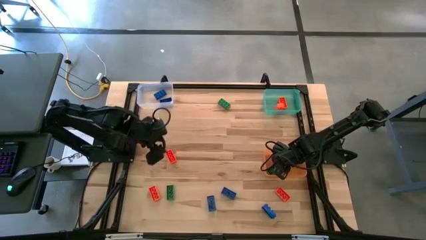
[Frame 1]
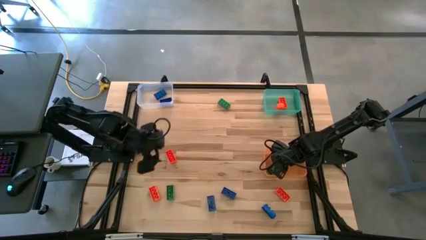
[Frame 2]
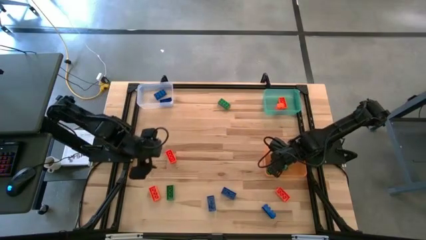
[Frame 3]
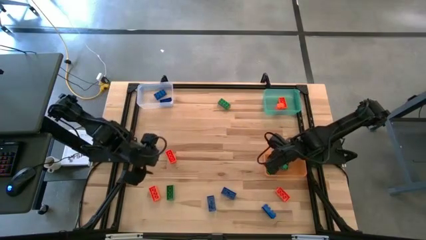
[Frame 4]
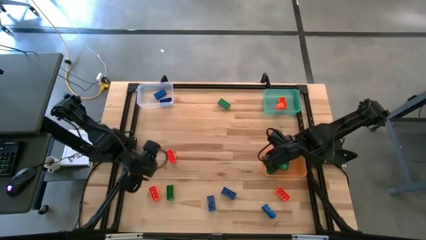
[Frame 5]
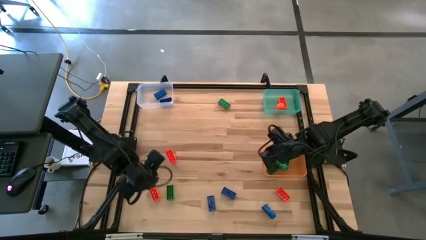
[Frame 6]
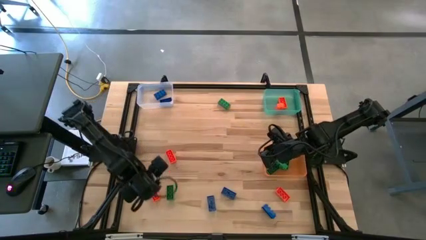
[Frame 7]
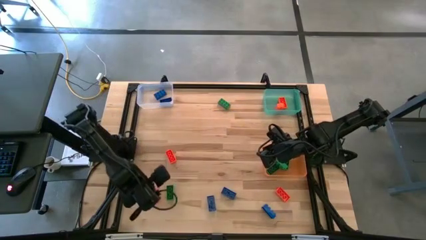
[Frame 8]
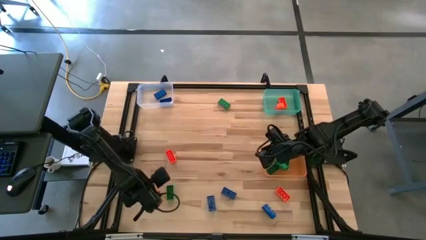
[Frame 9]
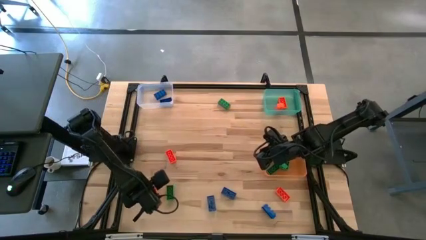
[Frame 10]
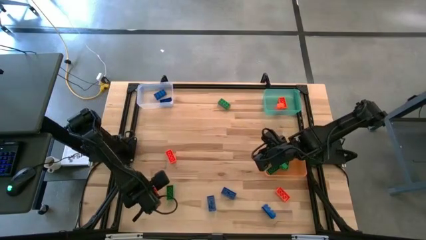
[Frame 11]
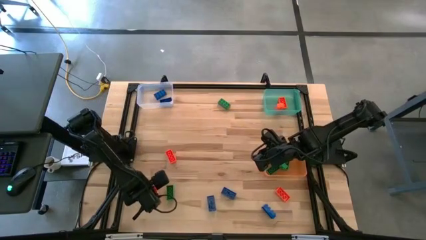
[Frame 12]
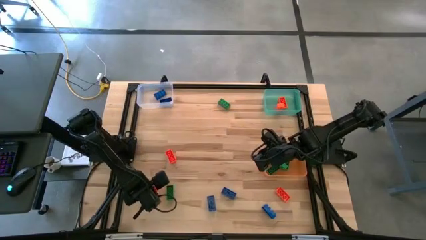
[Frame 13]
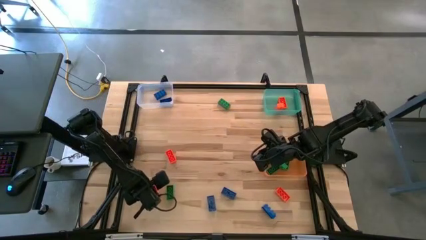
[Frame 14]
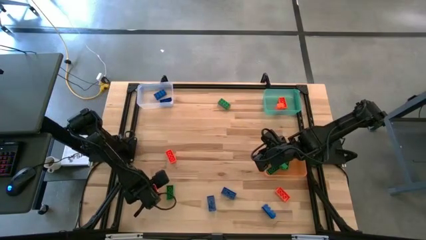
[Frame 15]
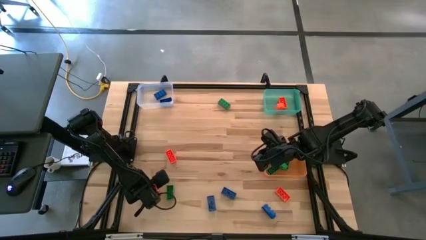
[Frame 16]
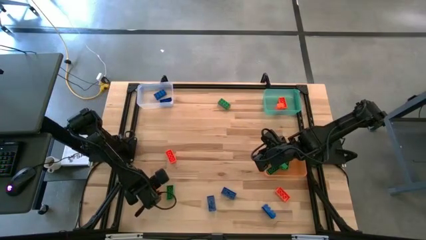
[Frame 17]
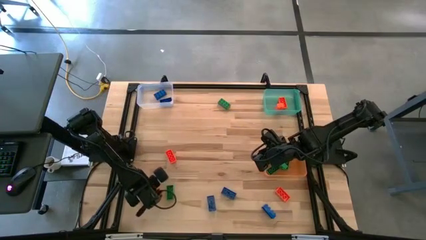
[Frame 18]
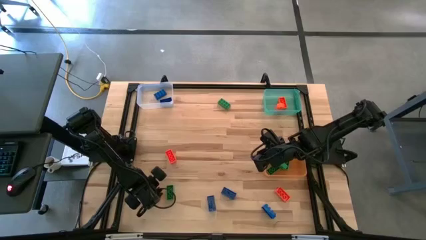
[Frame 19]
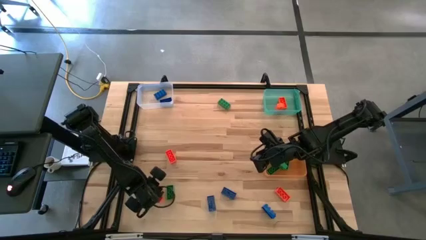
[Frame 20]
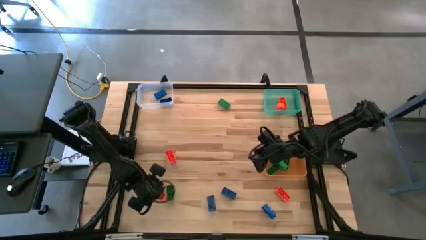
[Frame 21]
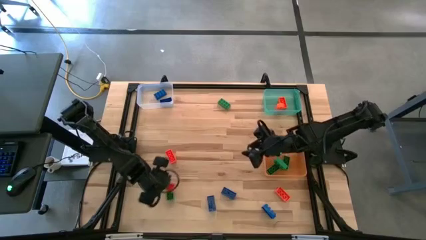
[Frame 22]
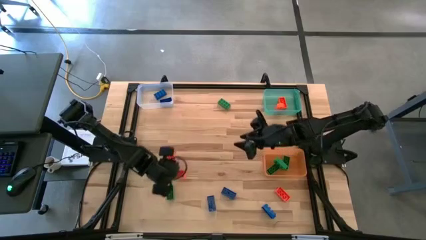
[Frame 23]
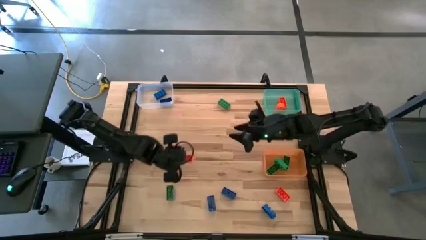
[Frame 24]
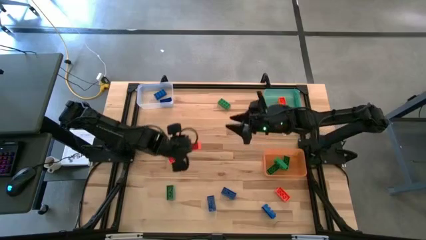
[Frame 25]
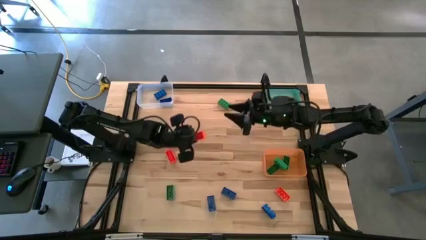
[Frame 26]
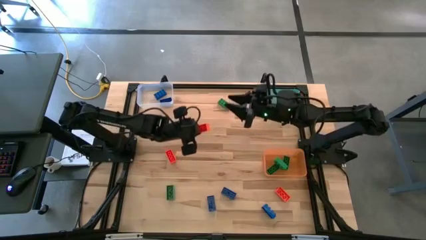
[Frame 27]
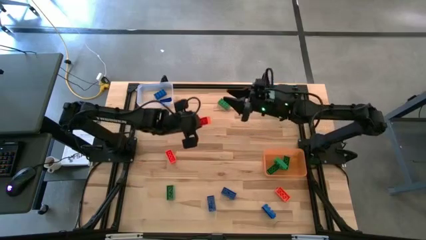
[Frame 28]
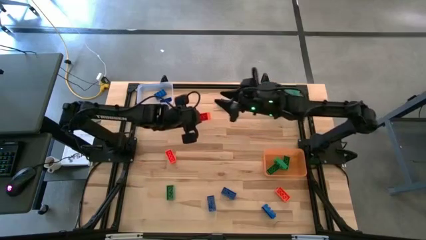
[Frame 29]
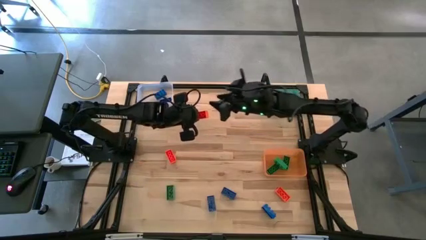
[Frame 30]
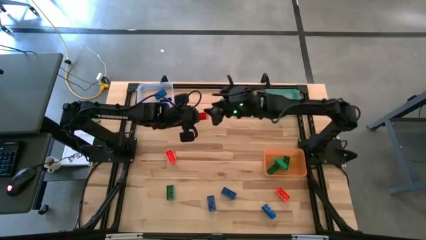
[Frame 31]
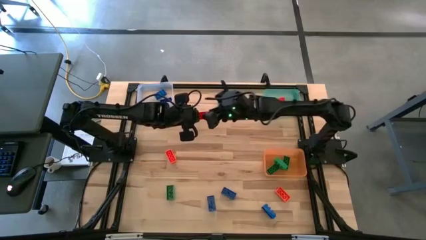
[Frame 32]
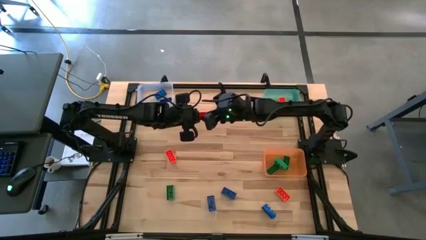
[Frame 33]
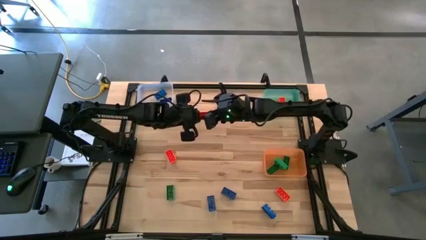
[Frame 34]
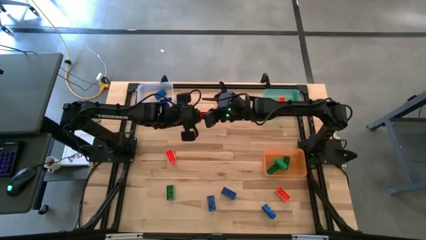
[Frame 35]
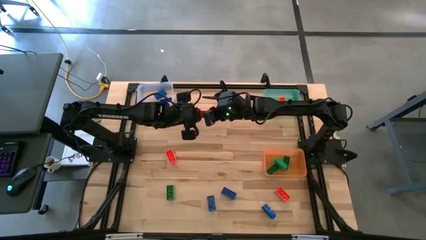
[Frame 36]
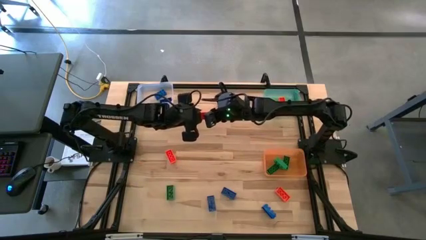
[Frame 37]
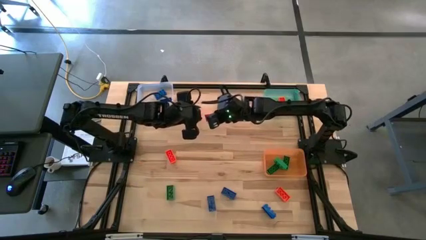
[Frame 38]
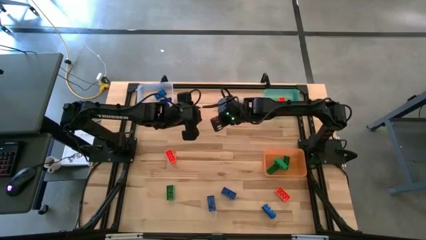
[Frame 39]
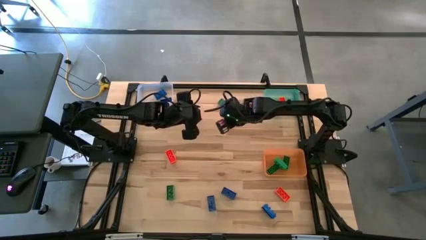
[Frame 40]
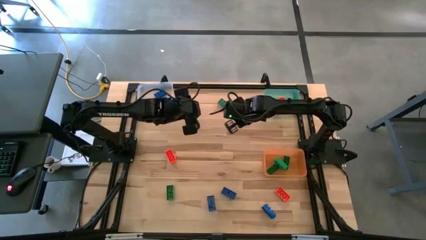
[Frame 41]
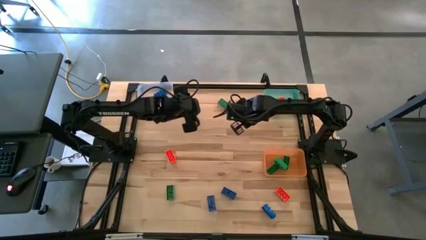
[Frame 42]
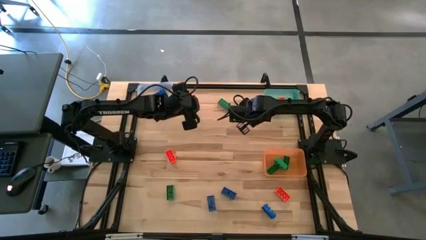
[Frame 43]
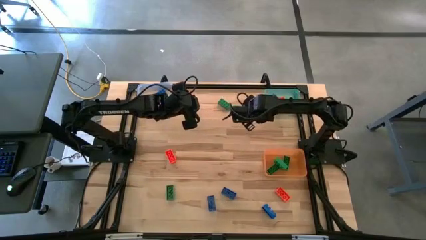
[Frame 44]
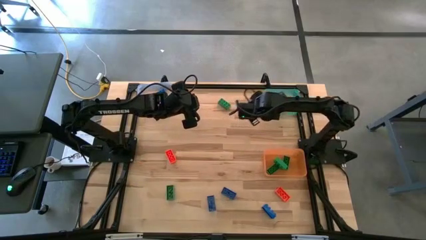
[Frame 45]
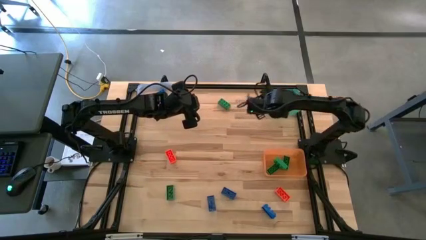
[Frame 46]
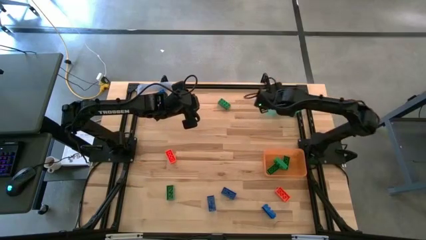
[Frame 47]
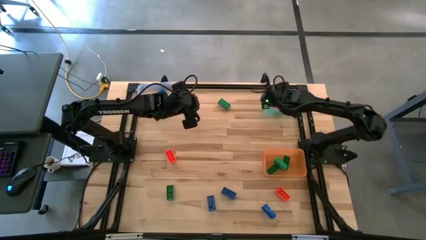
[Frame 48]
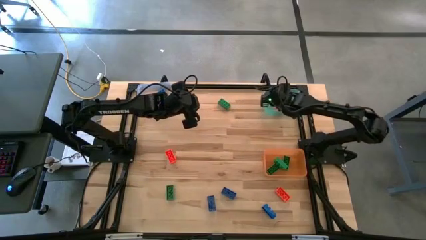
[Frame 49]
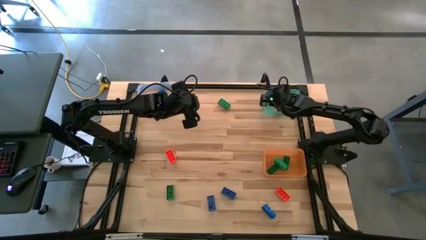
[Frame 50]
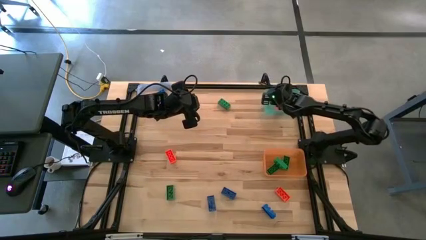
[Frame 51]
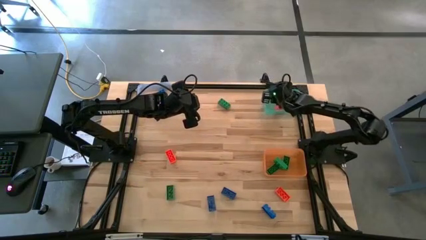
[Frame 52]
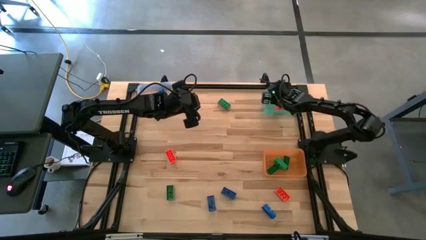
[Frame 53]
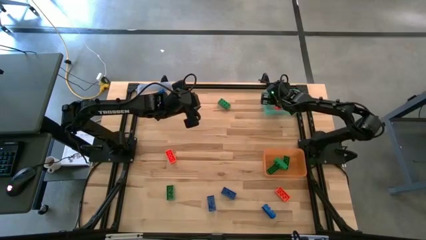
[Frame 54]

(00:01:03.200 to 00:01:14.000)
Task: Sort & place blocks by color
Put the orange game piece into the green bin
